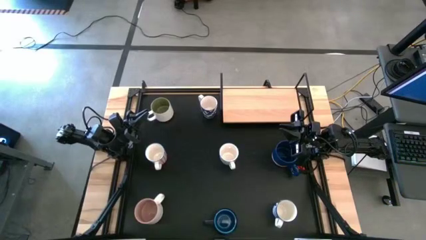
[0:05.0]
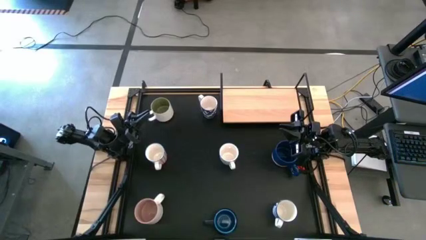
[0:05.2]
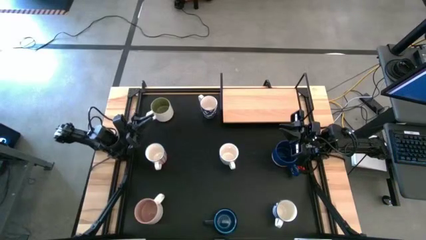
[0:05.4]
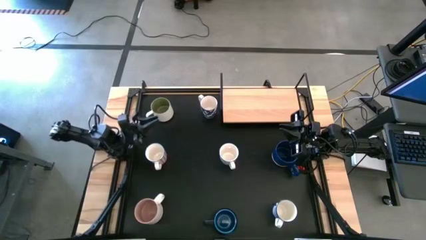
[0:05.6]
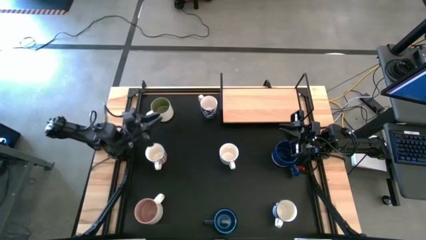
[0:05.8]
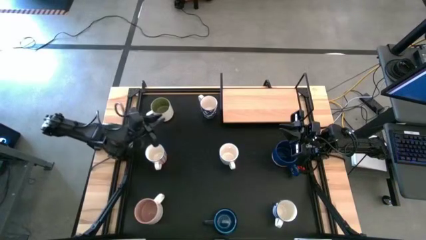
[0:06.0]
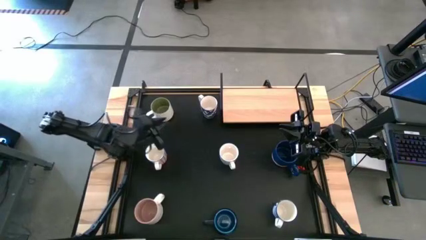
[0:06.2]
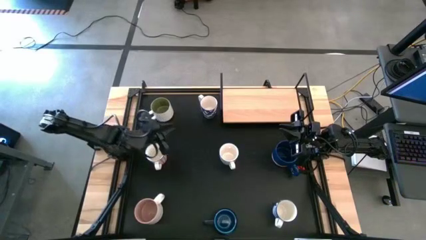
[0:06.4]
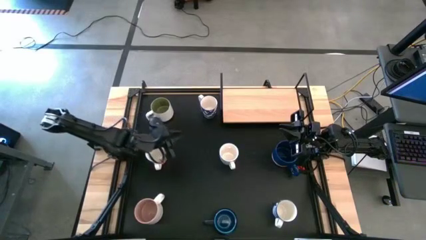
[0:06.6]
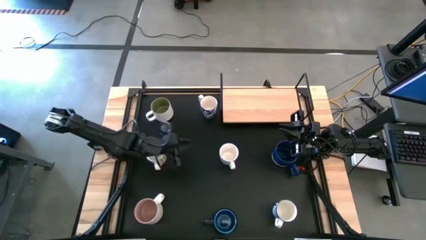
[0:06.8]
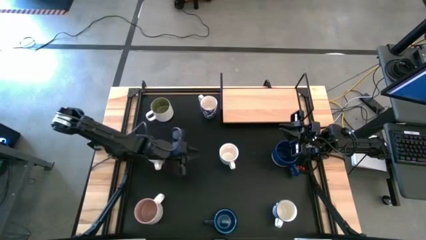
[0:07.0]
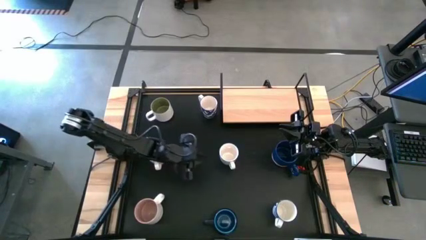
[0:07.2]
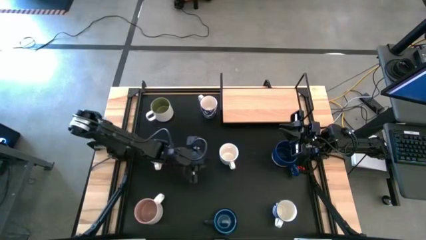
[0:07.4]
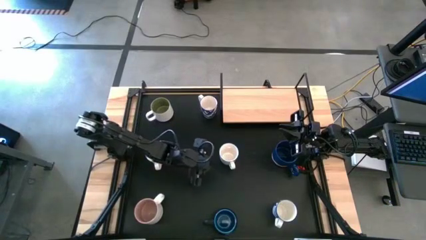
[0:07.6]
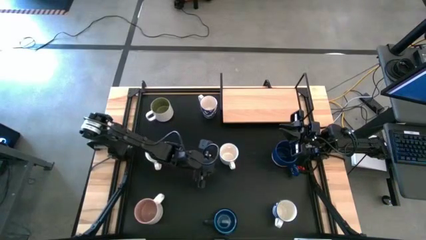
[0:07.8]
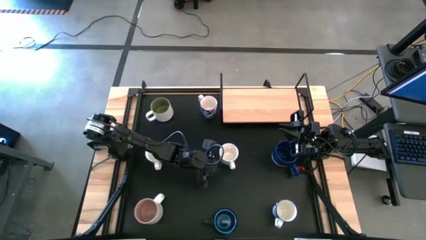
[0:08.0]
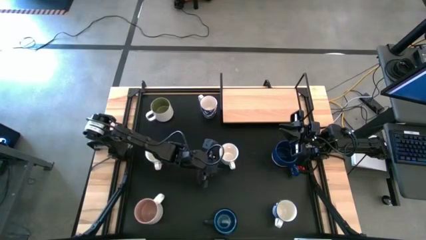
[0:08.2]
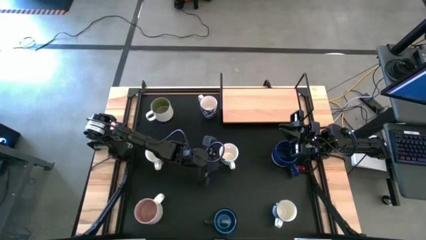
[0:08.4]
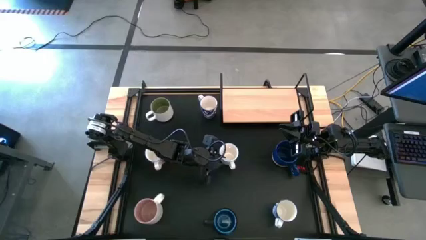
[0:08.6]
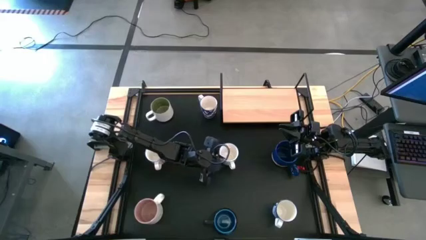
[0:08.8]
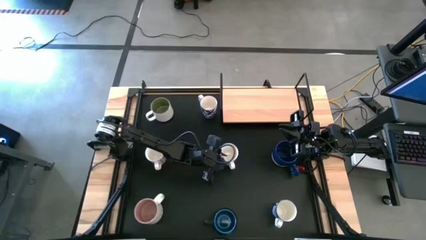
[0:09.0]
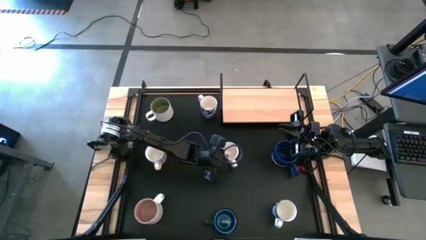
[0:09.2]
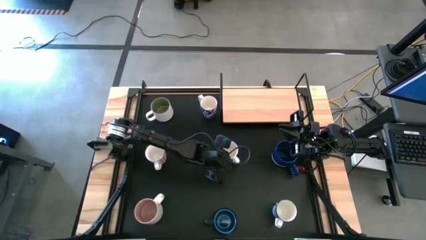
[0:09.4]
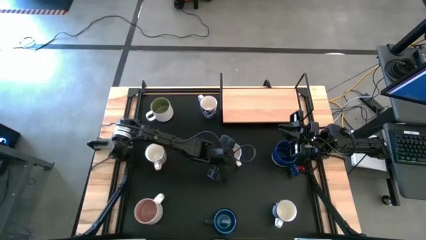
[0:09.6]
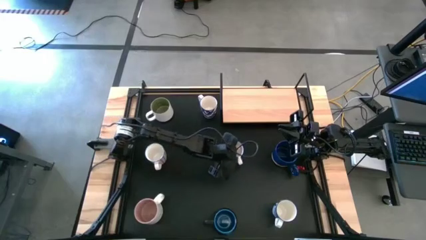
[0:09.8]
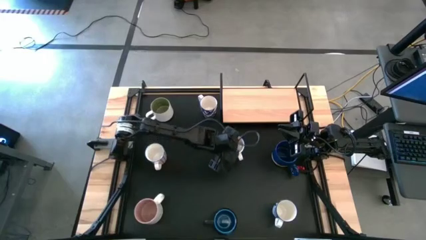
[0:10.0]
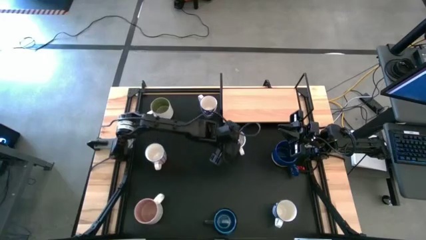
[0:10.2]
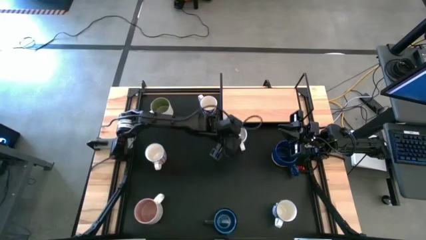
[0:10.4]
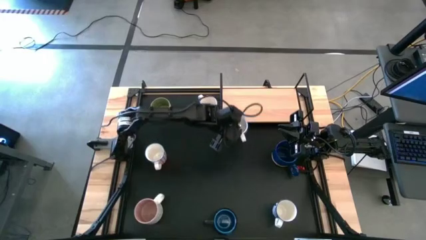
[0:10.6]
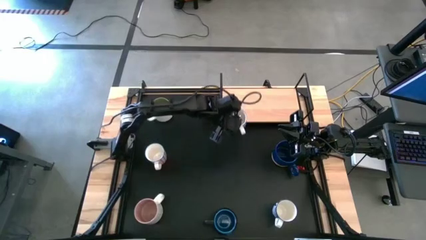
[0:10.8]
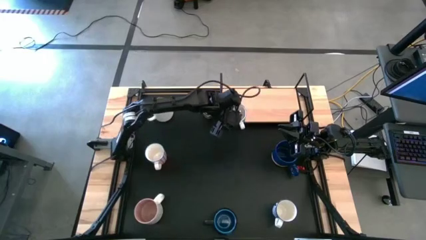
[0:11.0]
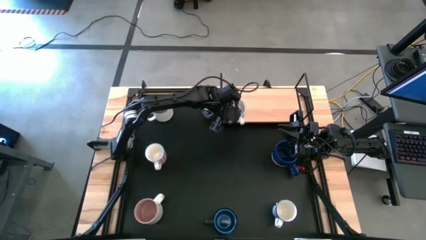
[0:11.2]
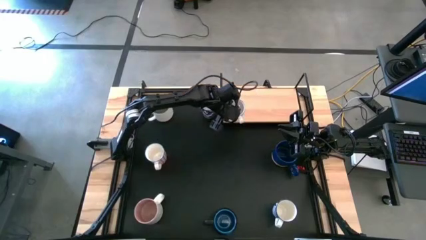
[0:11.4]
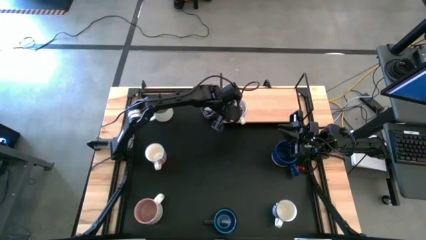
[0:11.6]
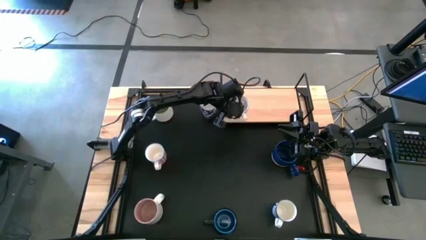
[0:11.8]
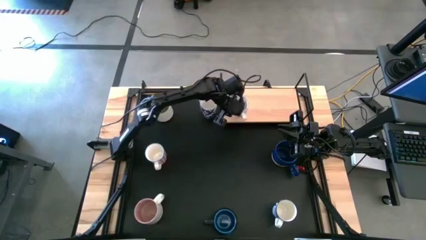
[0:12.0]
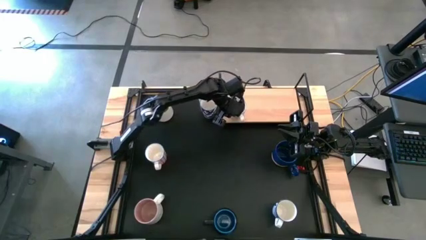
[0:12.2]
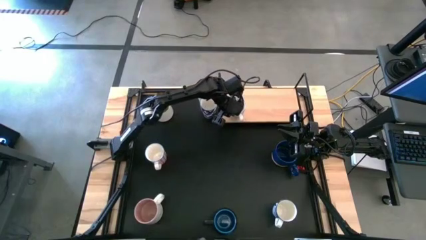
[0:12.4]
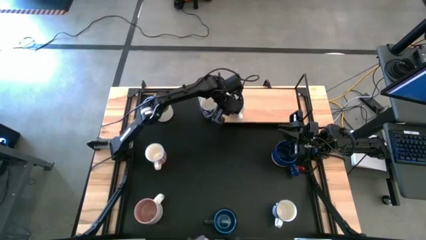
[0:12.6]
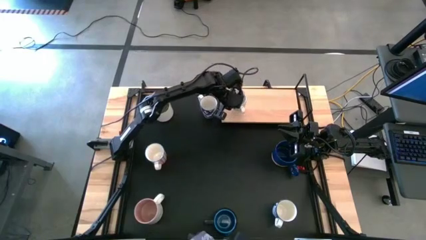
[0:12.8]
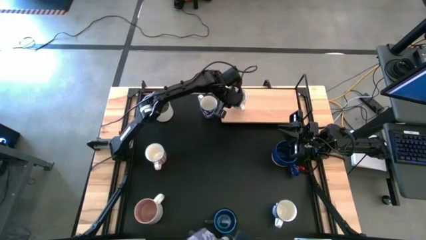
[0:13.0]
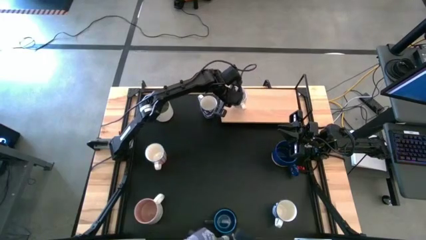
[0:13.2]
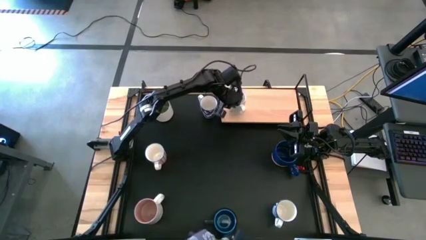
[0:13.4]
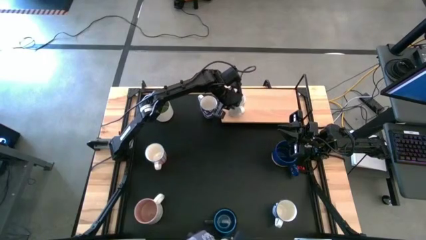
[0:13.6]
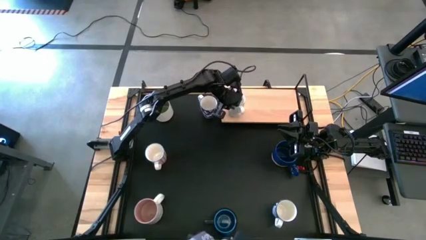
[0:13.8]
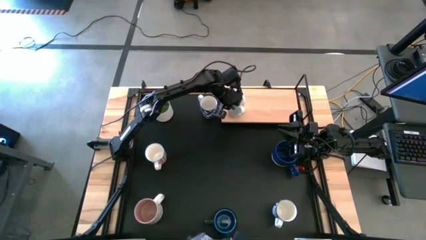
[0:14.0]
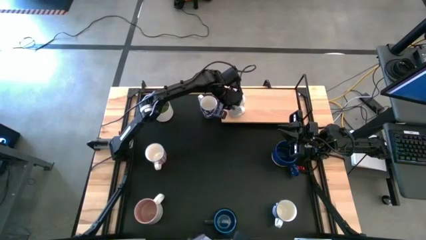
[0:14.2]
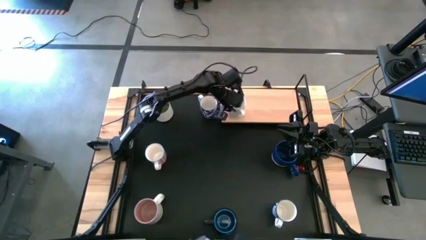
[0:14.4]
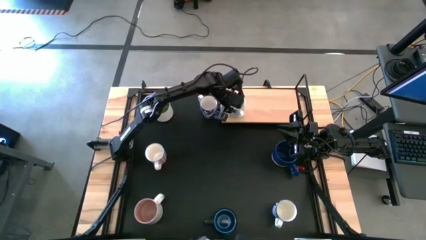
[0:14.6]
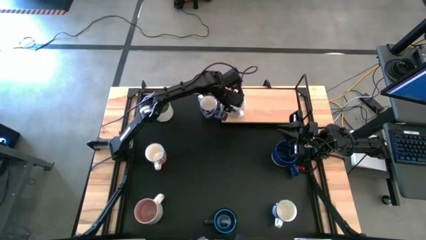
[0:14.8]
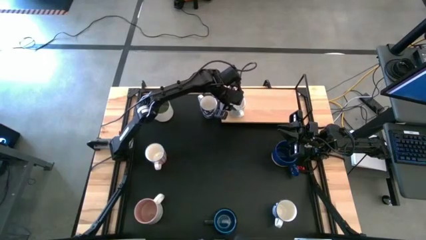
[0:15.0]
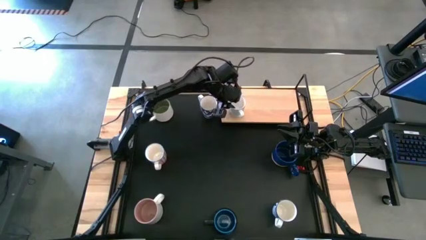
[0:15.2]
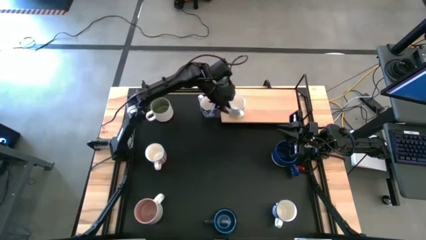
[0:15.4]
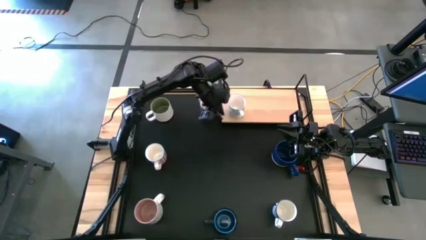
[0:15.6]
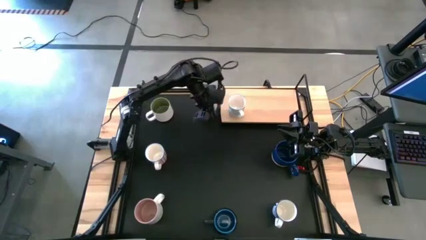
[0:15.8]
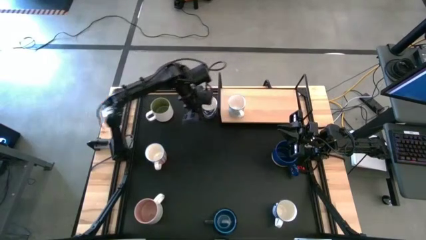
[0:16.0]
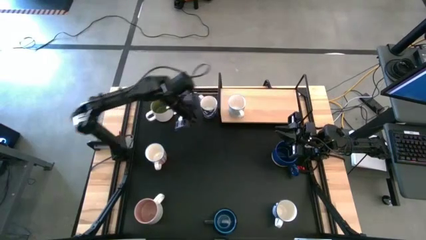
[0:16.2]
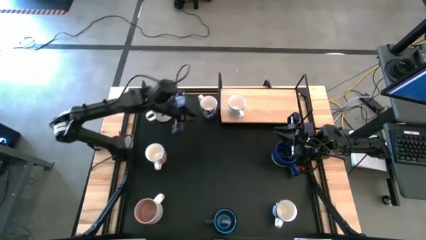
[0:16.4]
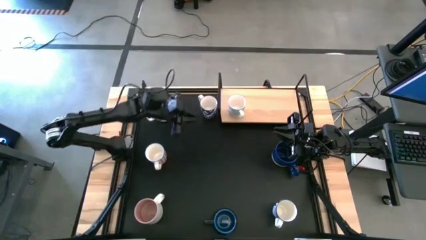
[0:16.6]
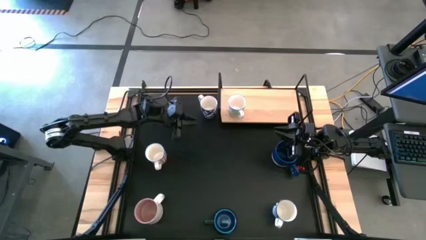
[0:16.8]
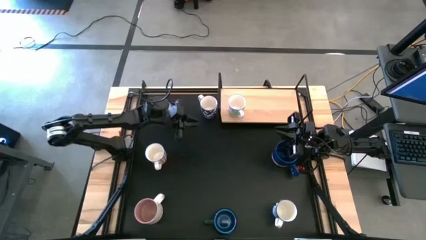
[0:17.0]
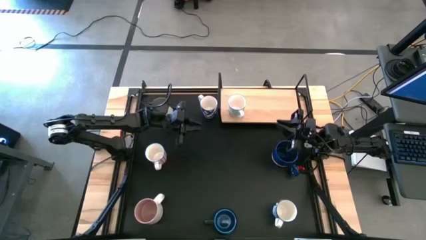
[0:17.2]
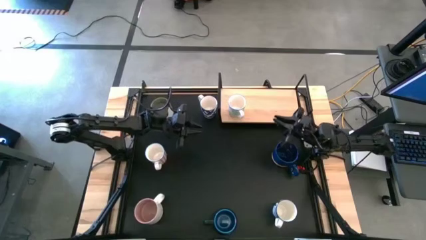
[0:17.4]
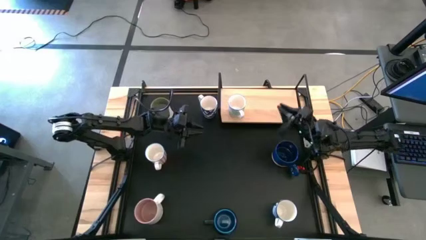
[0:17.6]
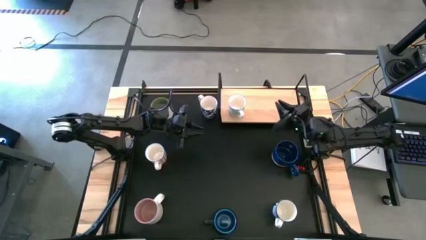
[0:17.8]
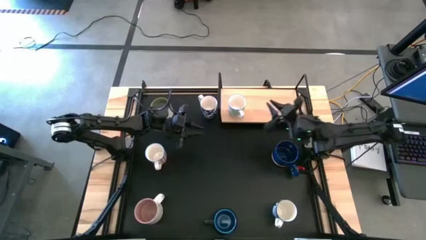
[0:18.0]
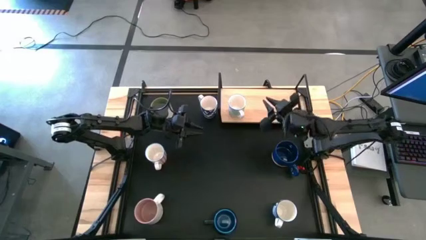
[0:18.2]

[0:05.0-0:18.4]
Task: Place coffee mugs
Put the light blue patterned mug on the shelf
